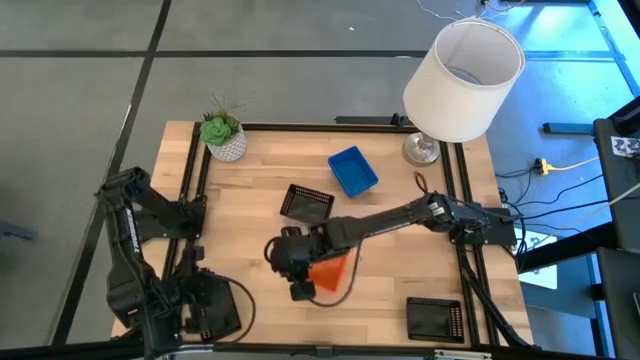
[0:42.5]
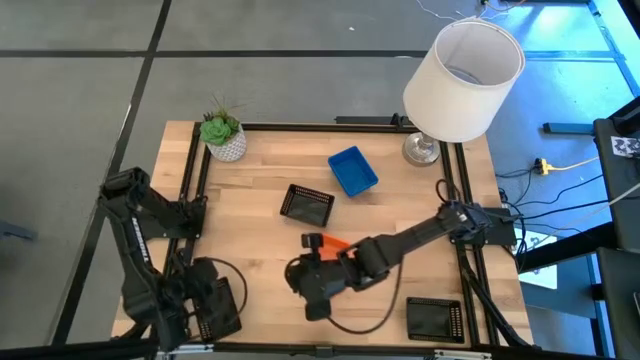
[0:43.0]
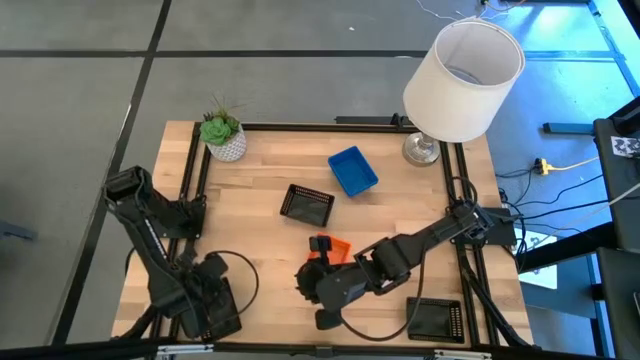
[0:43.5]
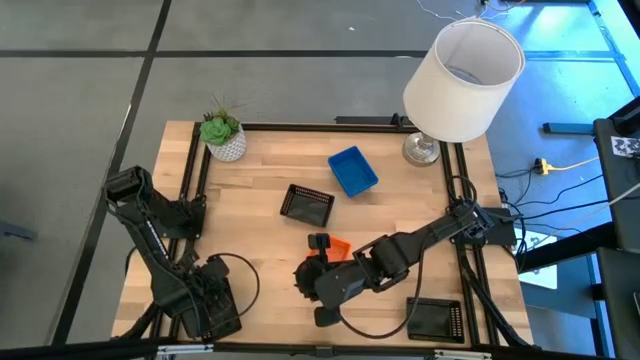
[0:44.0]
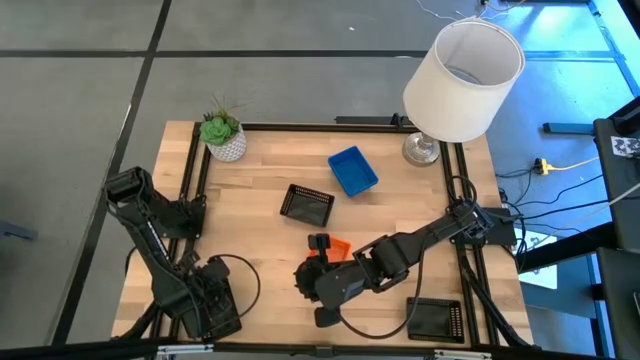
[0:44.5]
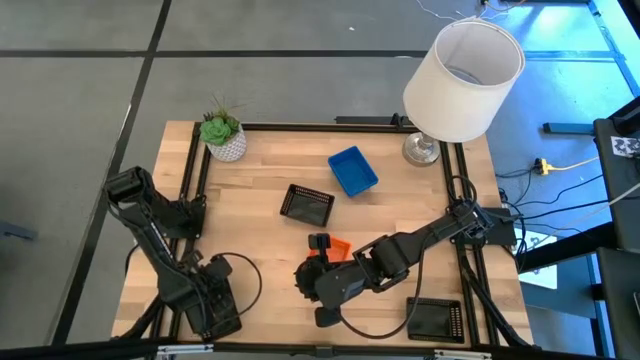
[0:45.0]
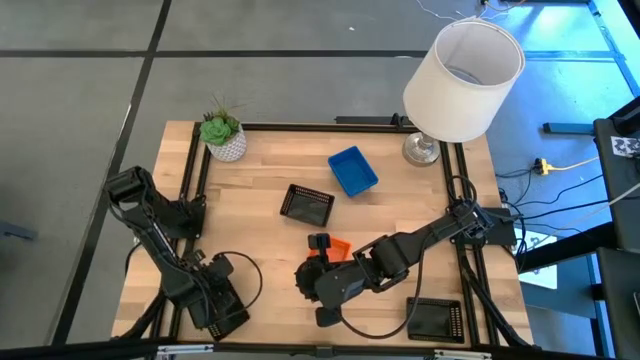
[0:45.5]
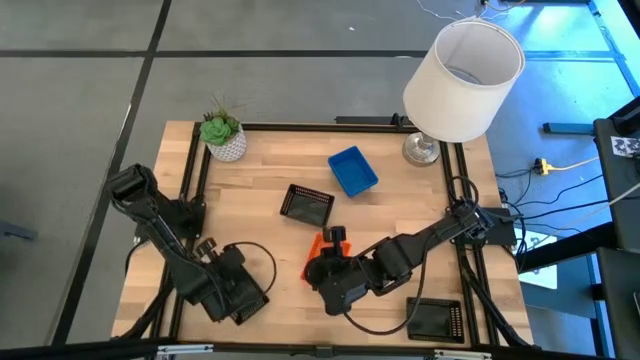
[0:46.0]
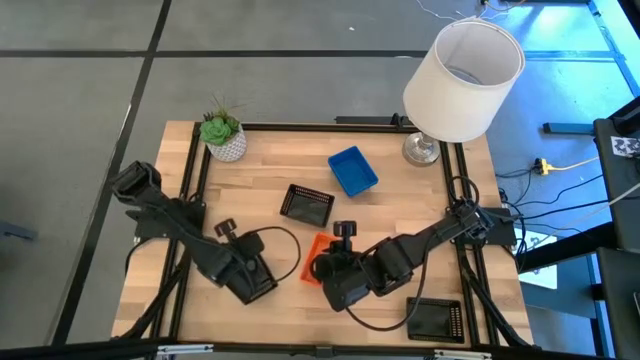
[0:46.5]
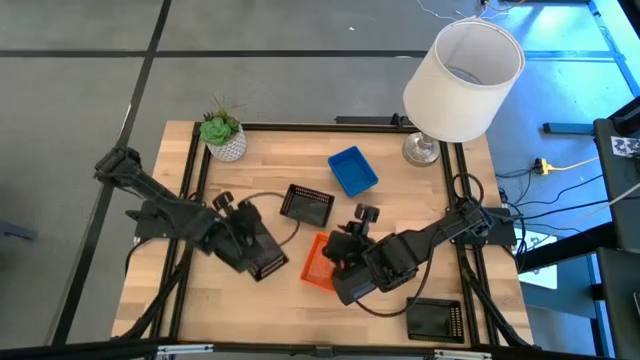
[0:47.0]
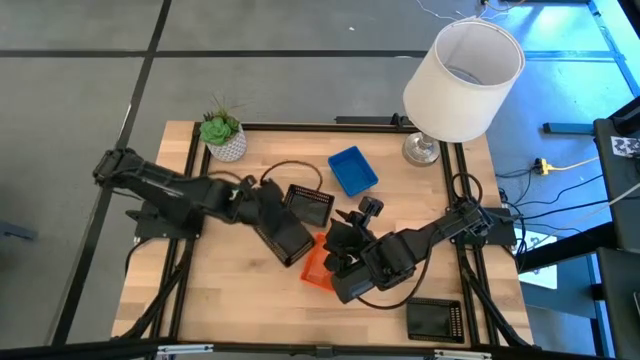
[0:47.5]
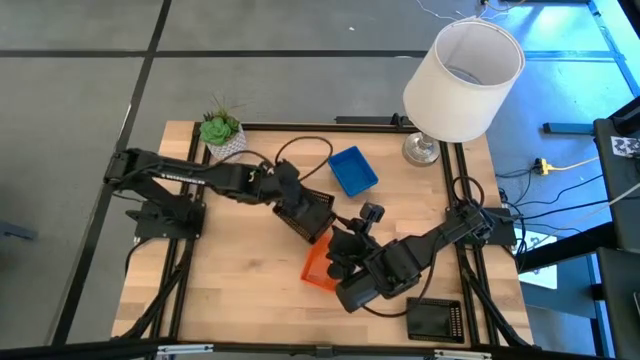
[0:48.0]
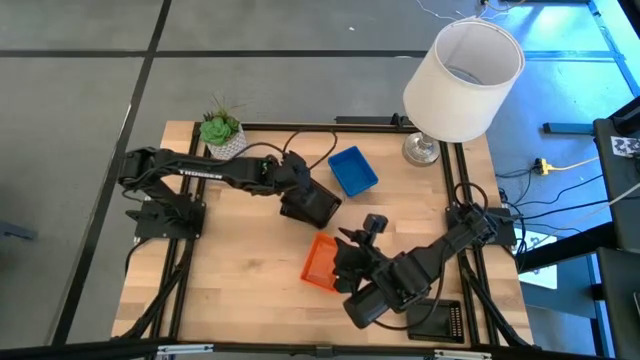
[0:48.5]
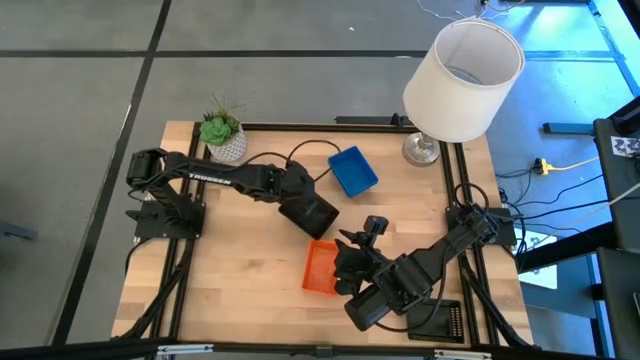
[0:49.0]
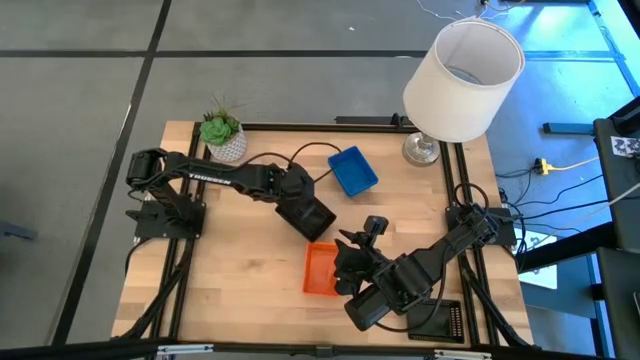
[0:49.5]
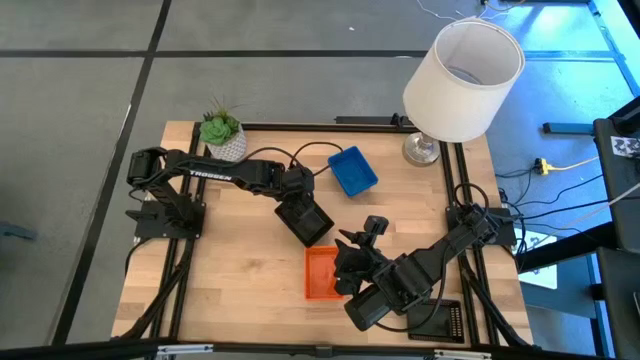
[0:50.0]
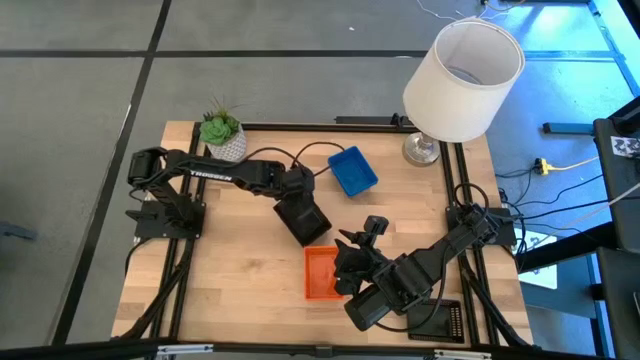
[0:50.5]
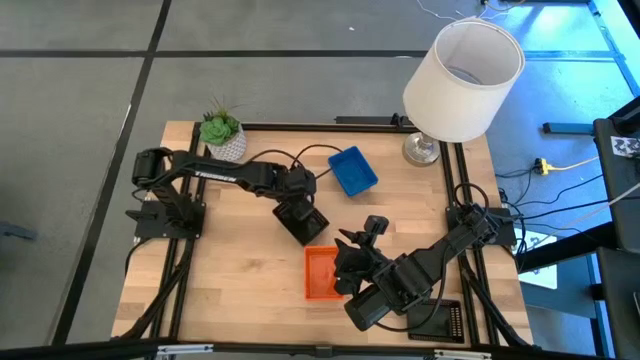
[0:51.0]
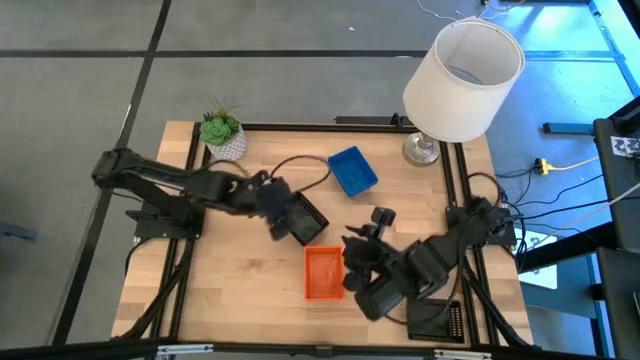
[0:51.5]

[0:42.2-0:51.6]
Stack the left black bin on the top black bin

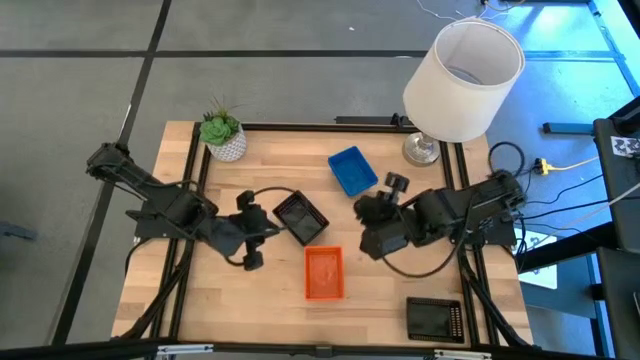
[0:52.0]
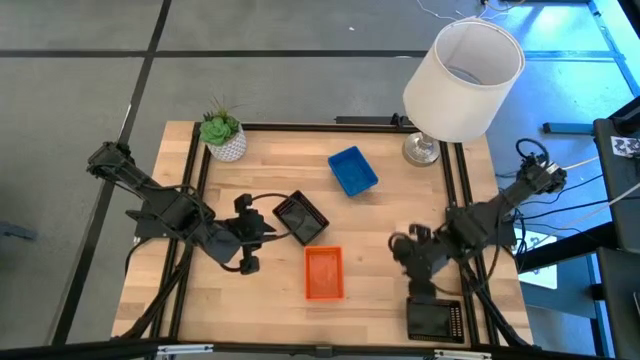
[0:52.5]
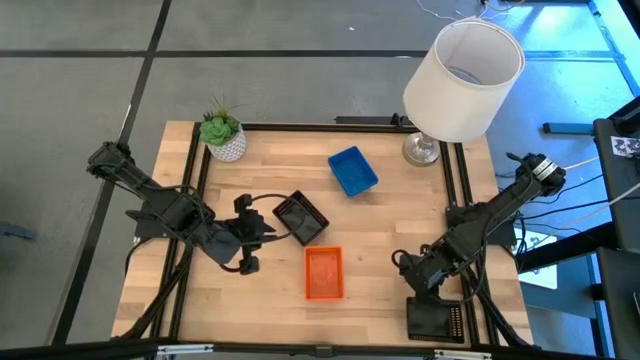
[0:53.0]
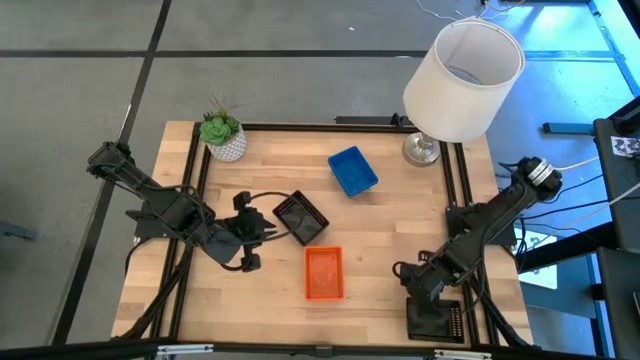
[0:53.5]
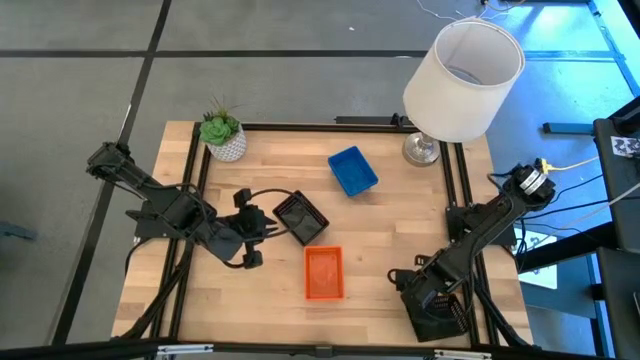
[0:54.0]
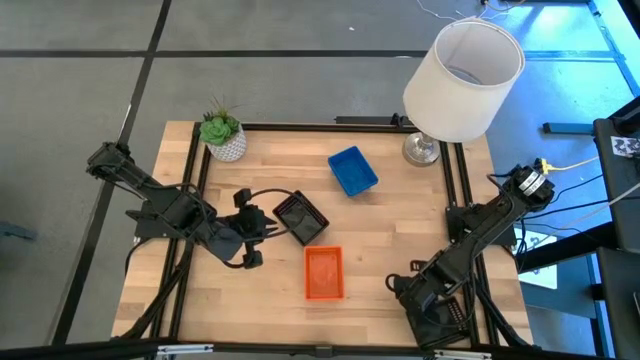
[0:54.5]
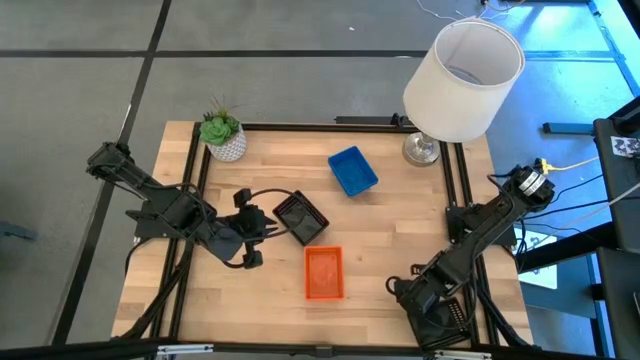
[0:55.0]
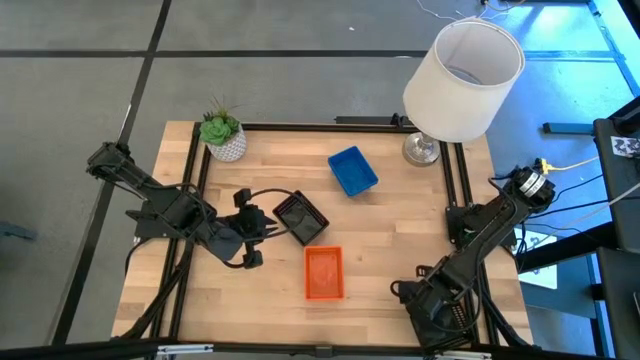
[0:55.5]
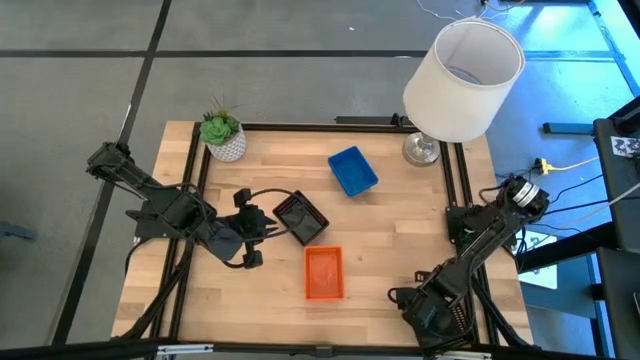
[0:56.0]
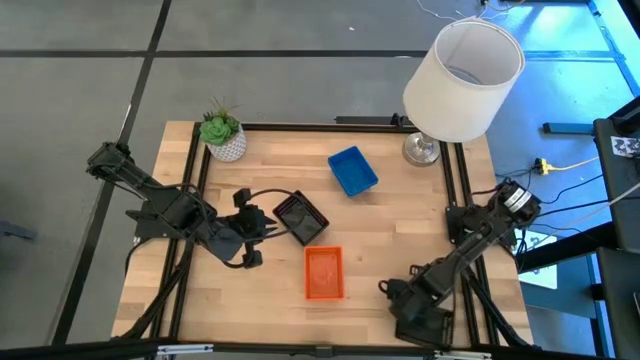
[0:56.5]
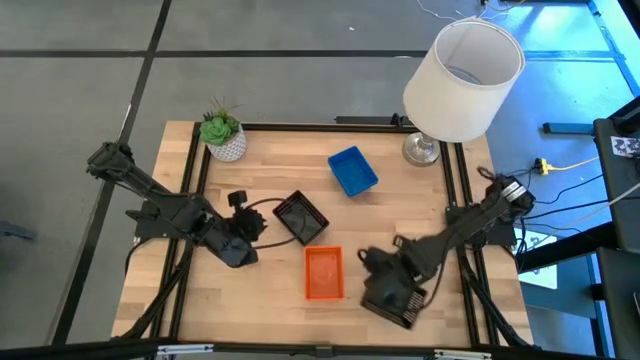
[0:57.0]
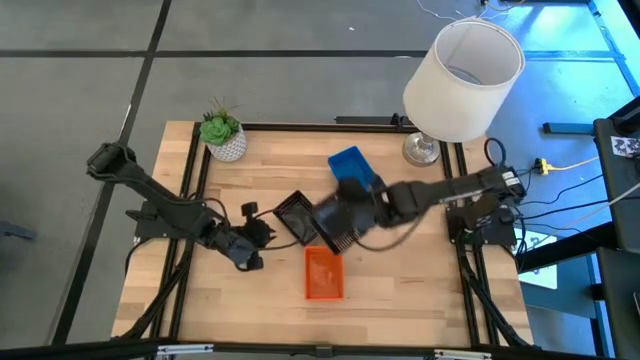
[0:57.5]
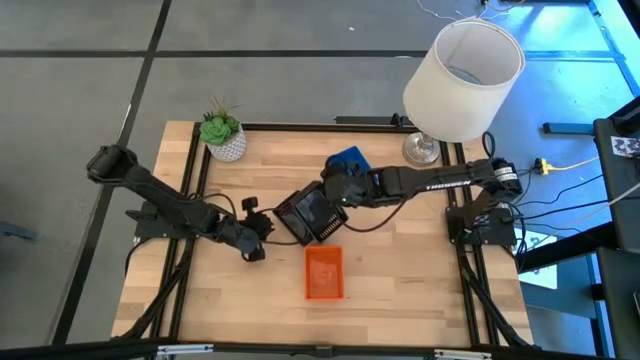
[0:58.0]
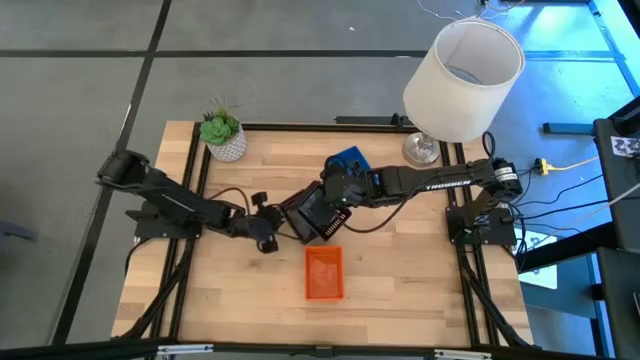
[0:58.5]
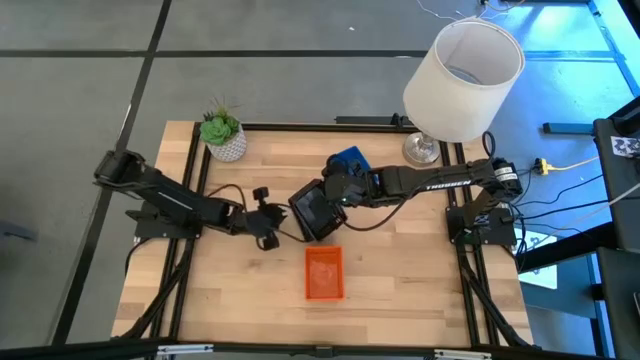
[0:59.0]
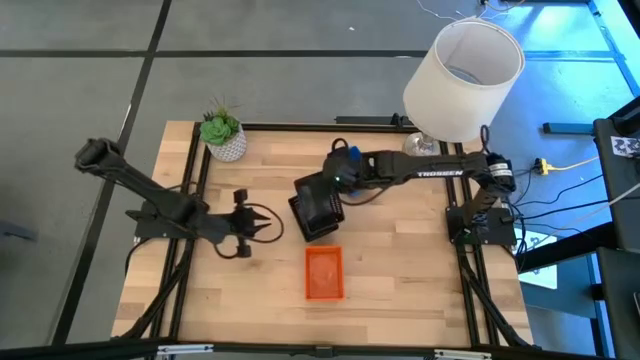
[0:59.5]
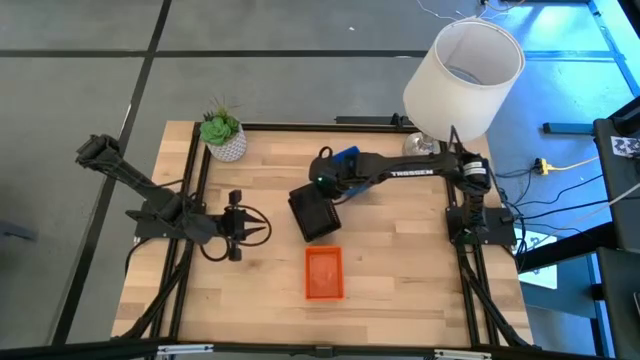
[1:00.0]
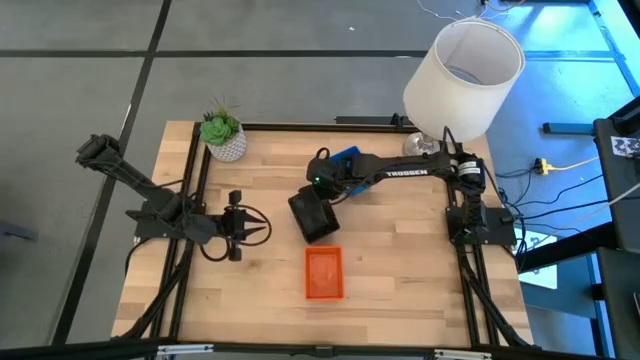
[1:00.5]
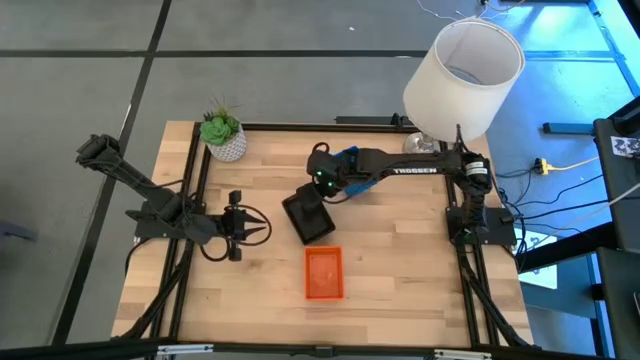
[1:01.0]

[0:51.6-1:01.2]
Stack the right black bin on the black bin
